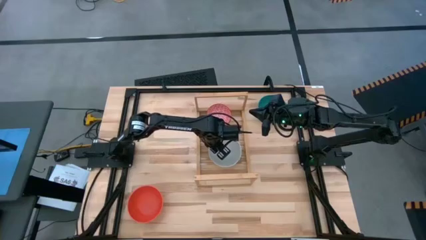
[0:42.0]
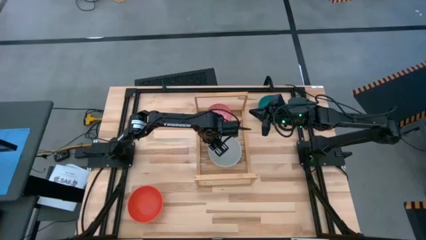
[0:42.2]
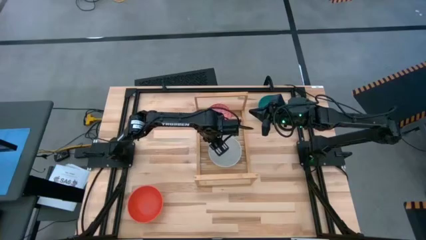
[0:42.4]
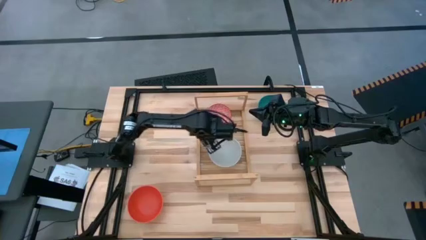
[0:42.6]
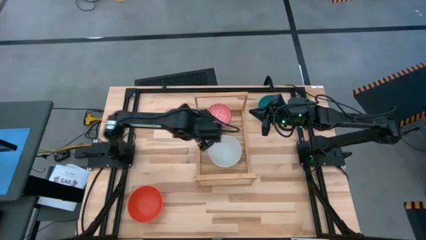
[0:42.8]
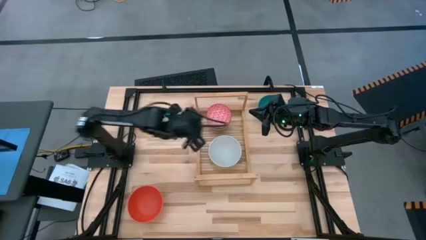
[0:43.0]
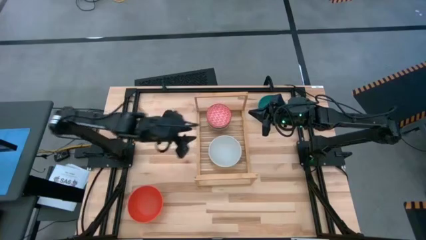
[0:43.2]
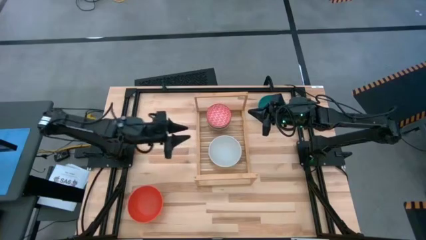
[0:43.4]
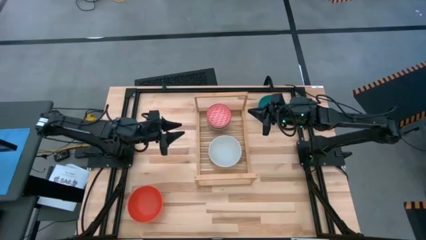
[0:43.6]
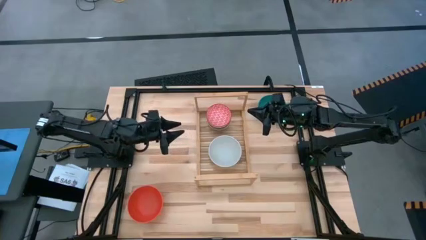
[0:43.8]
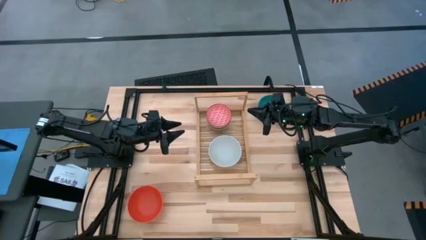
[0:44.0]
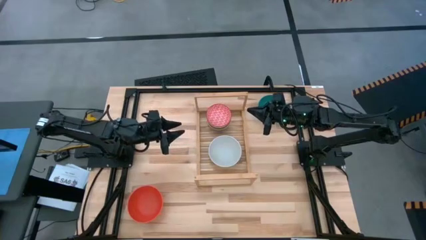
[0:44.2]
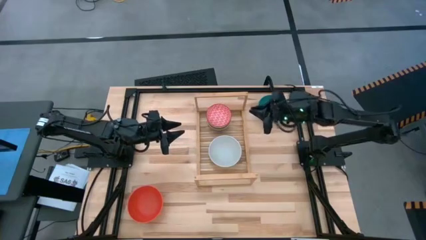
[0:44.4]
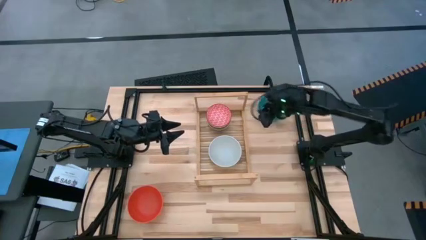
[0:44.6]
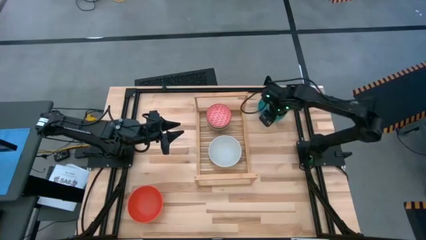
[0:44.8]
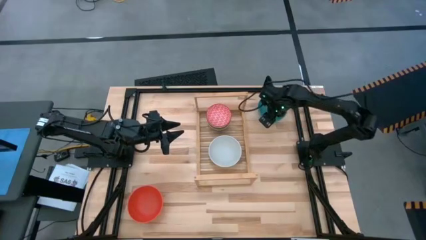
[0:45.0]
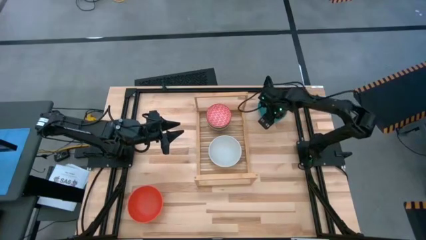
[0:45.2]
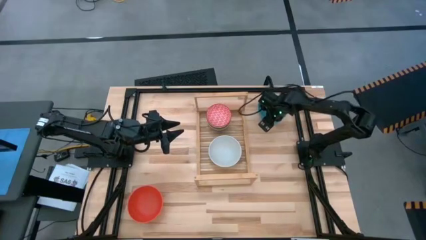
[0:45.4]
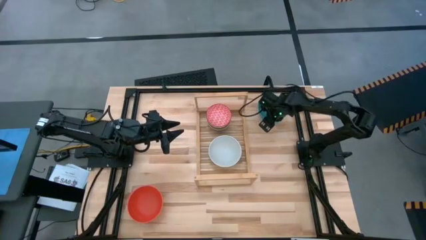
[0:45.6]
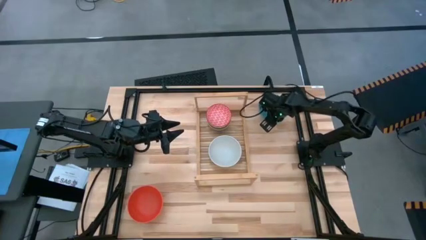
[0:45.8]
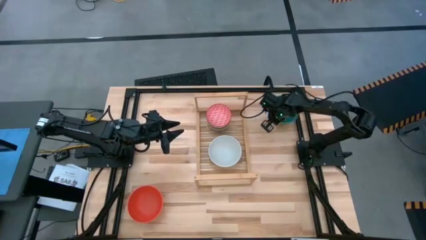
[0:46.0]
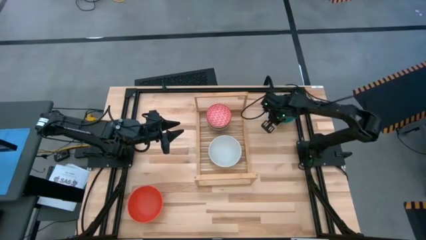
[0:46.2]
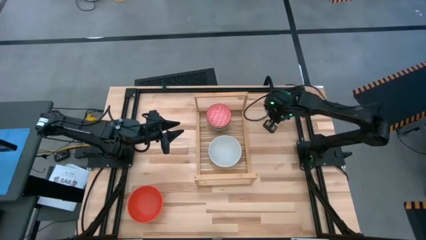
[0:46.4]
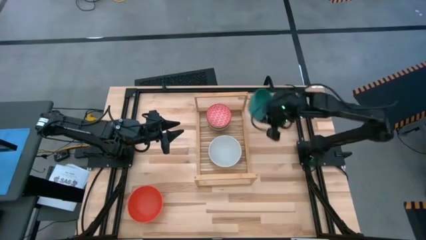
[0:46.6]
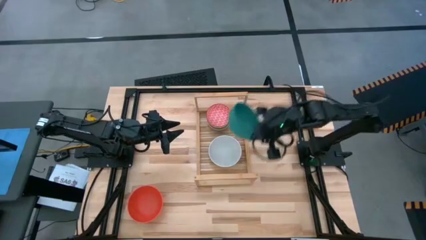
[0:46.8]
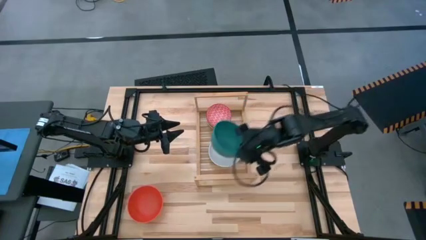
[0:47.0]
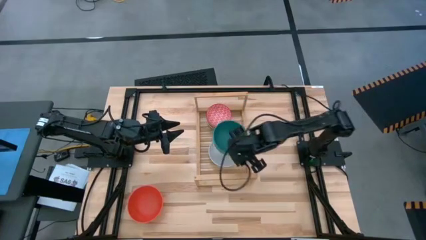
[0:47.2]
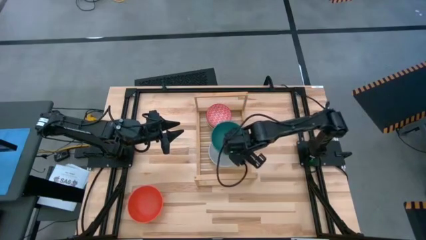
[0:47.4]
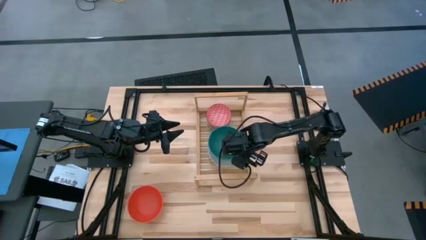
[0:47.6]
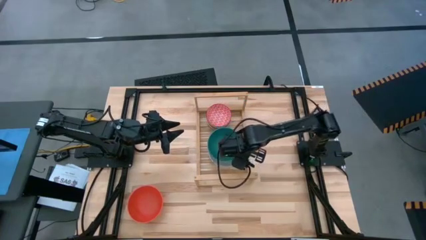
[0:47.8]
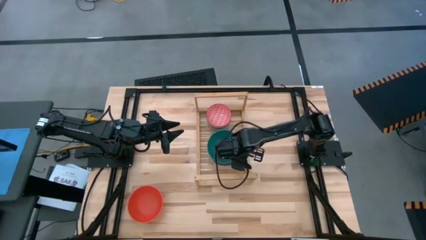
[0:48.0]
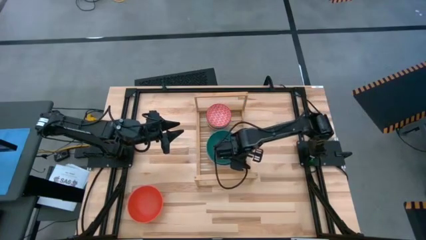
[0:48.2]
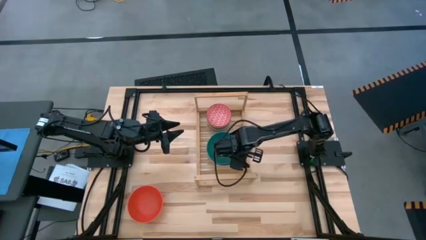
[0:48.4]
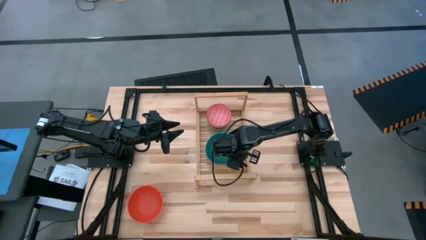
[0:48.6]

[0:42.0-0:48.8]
Task: Place and stack bowls onto a shelf
Stack the green bowl on top of the gray bowl on the shelf

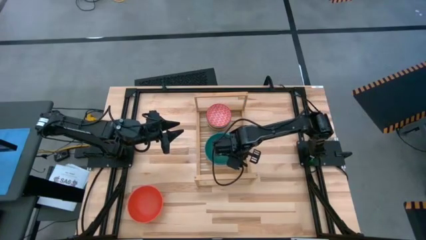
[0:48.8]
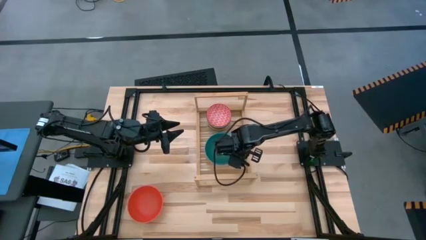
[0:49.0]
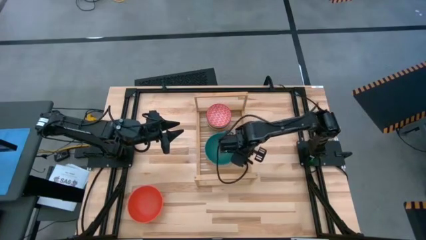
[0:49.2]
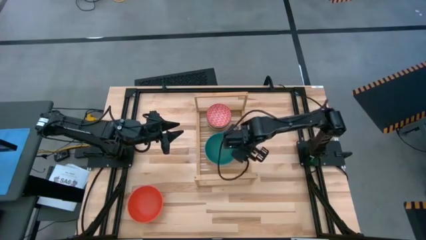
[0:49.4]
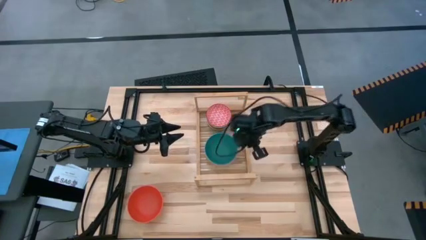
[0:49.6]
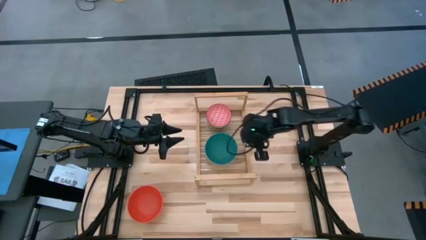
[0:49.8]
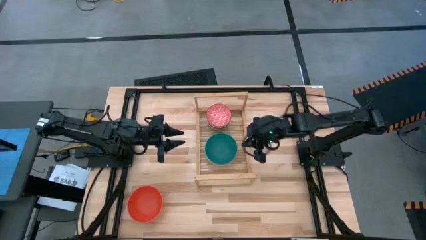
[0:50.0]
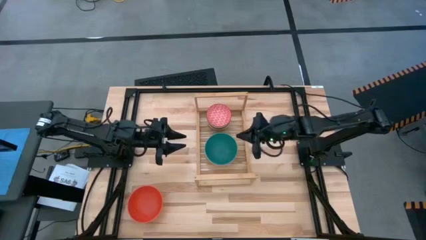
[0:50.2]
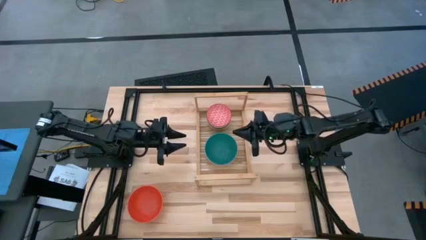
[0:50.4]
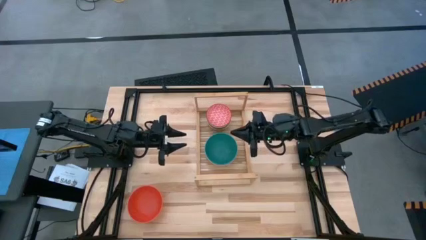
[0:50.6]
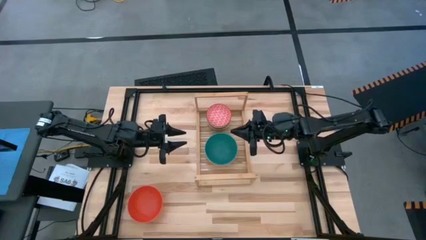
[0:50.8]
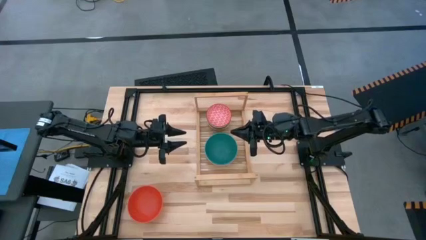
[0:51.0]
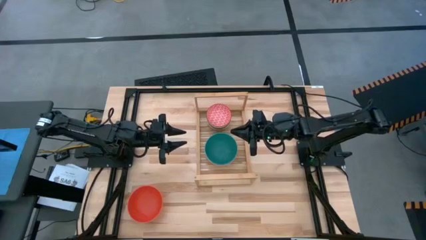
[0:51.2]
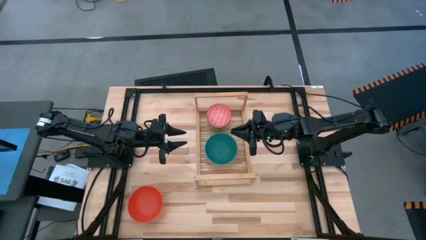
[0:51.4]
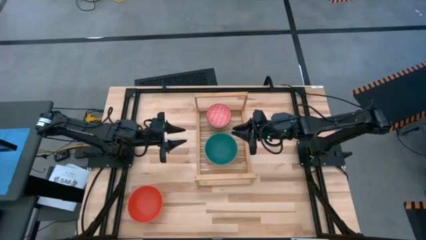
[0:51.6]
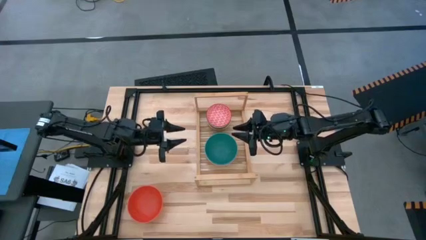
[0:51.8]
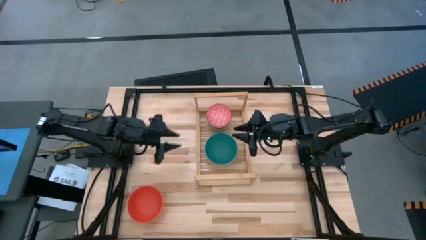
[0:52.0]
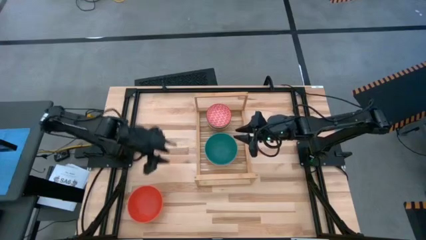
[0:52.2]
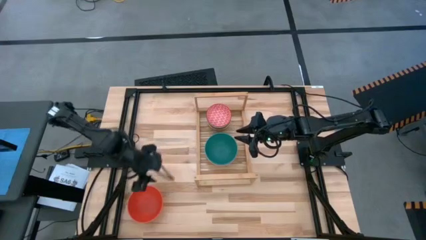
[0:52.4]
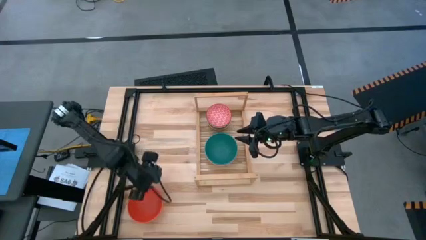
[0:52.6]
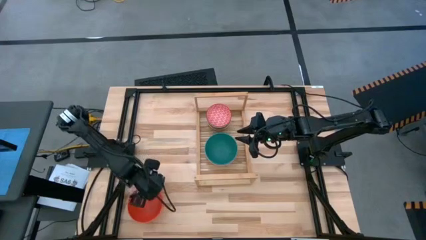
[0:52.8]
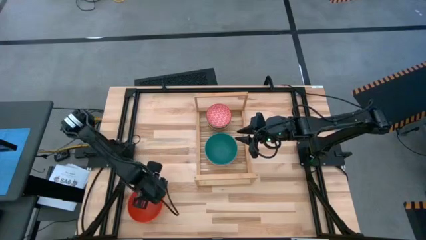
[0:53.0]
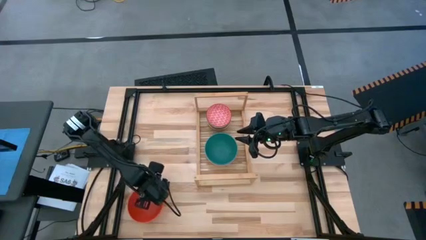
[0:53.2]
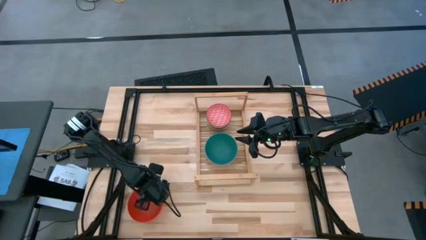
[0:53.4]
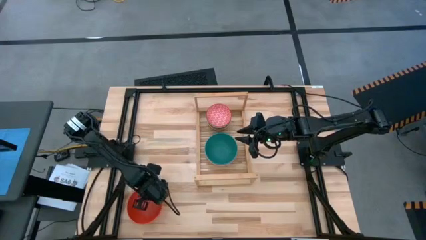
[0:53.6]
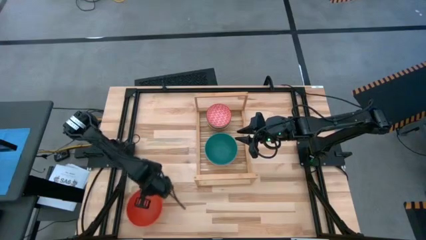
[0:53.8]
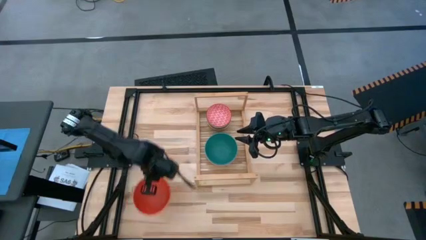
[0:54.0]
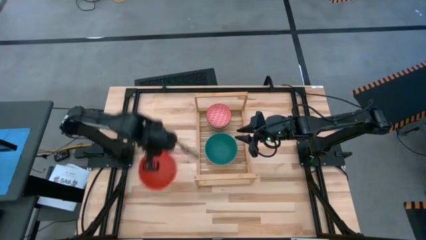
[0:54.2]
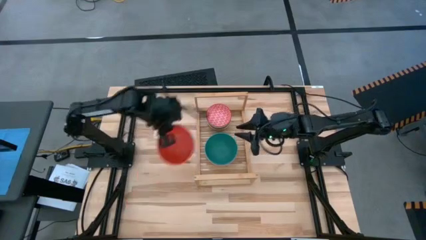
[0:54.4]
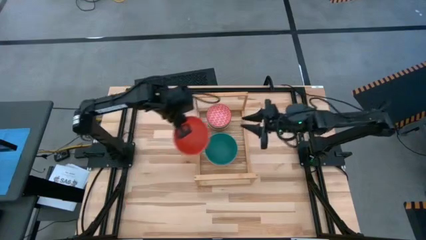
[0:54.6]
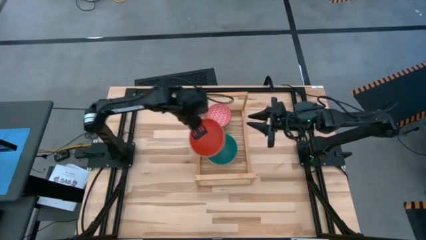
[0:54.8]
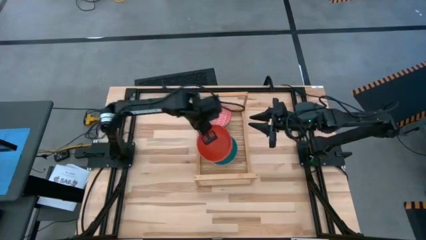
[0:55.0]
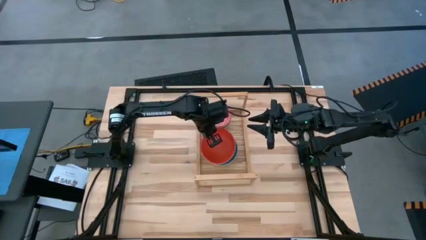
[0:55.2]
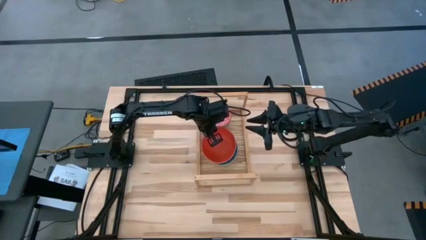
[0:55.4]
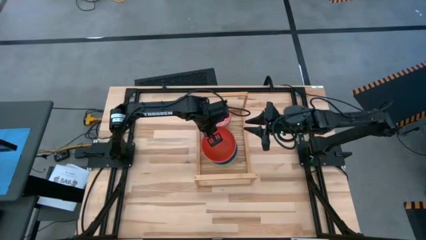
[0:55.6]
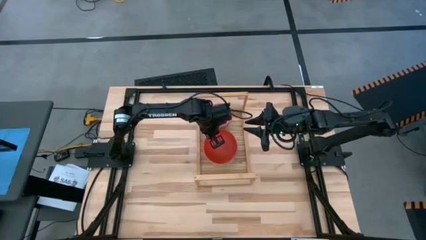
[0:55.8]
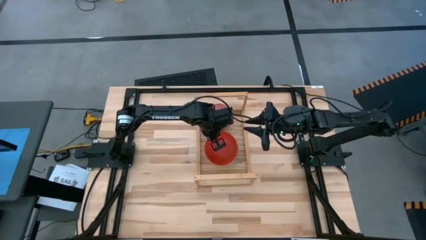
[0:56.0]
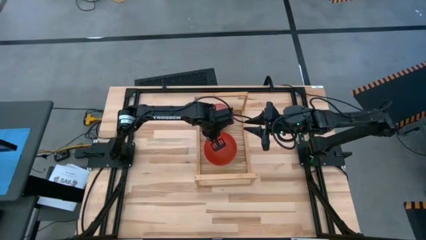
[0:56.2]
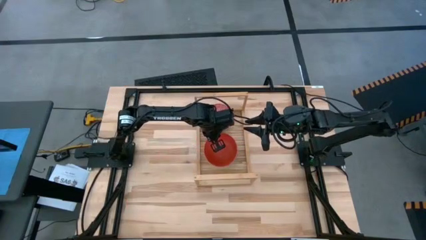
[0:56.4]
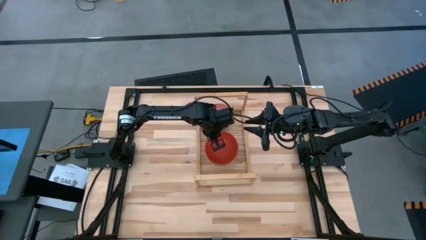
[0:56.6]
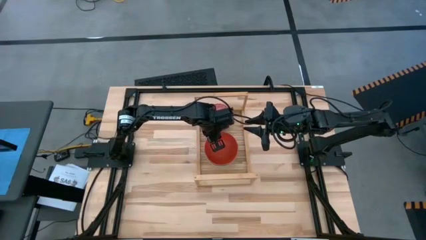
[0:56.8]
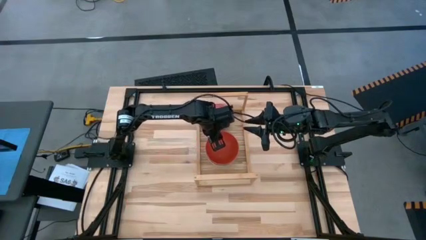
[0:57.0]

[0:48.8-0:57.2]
Stack the orange bowl on top of the green bowl on the shelf

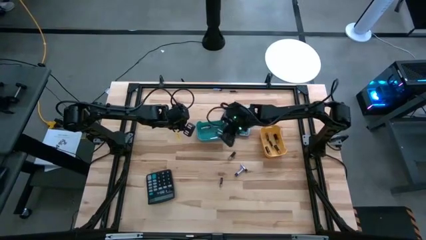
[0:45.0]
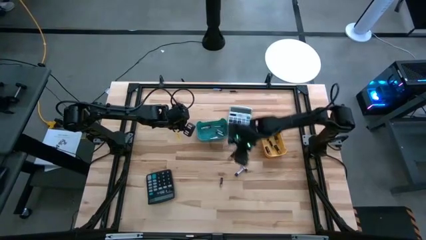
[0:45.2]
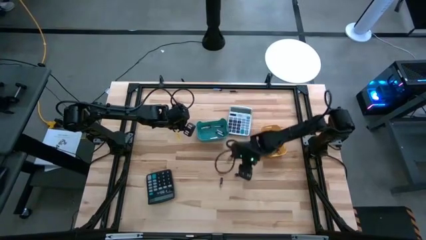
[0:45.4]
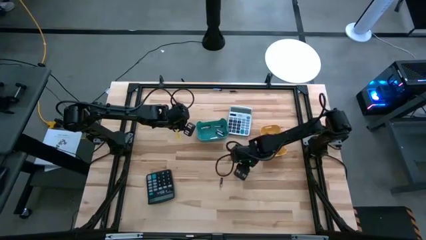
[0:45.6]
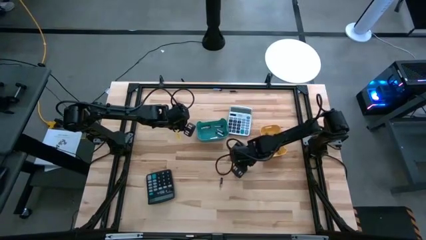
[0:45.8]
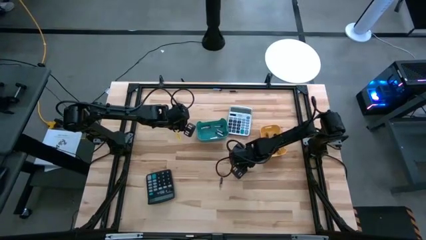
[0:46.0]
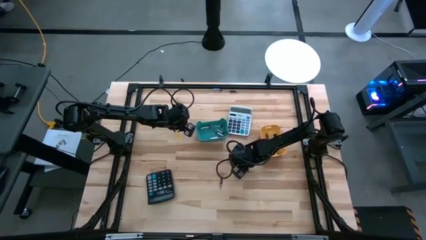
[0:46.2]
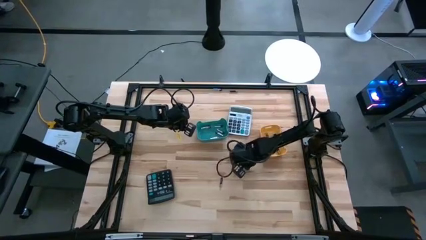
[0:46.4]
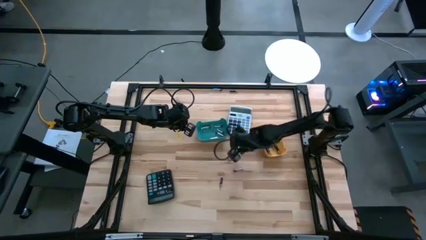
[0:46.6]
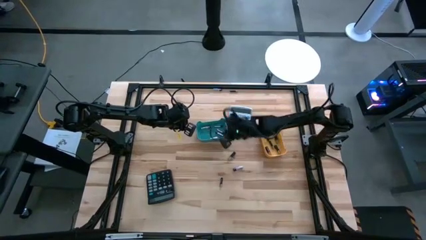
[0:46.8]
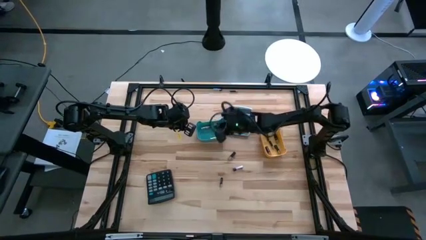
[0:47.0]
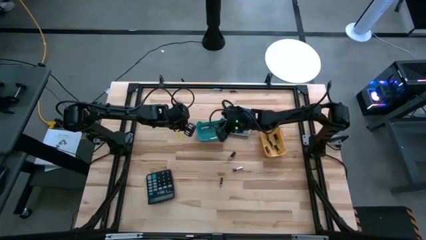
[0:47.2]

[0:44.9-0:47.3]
Task: Sort batteries
Put the silver battery into the blue bin

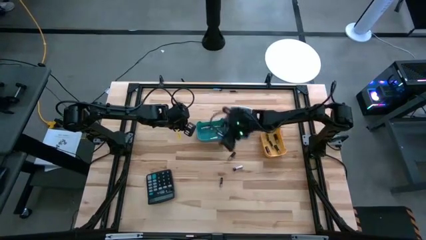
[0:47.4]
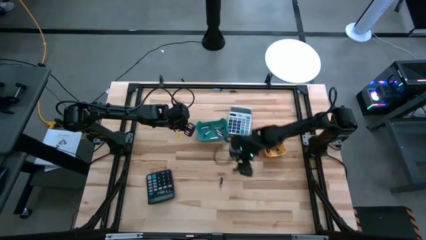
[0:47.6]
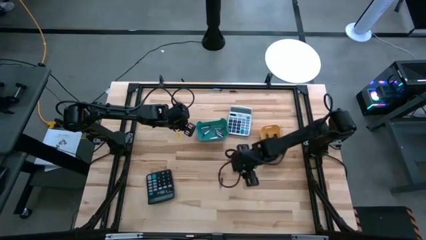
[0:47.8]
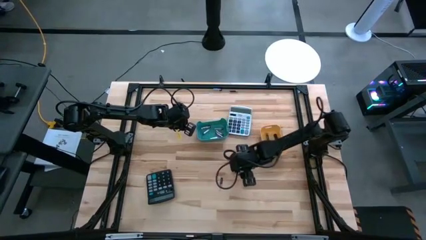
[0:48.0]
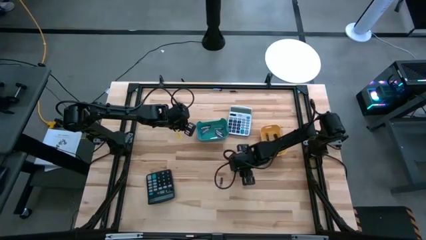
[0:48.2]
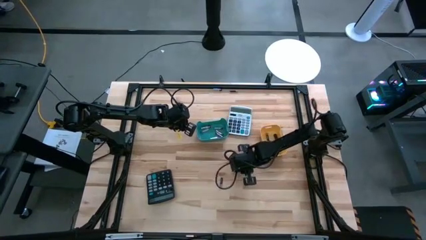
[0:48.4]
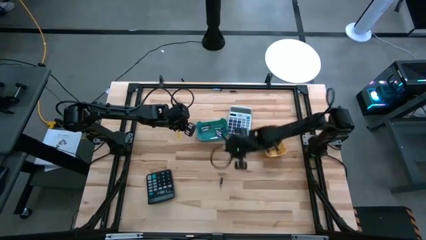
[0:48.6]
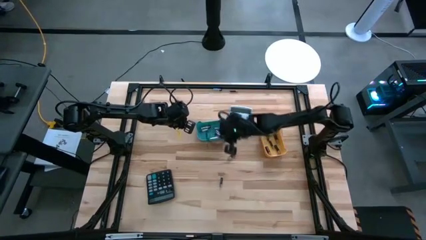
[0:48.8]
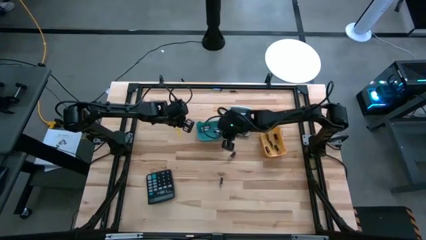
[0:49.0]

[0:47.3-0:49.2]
Put the silver battery into the blue bin
